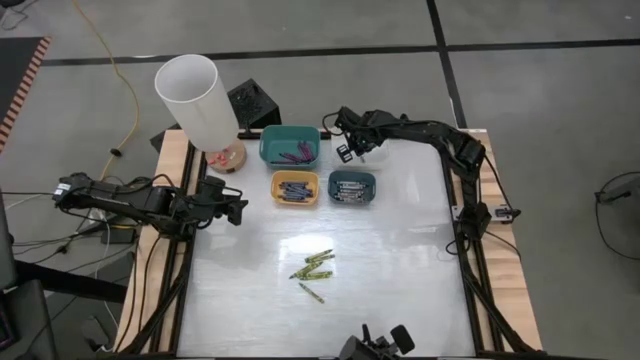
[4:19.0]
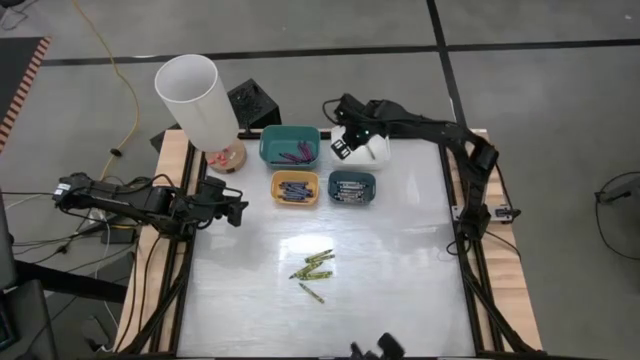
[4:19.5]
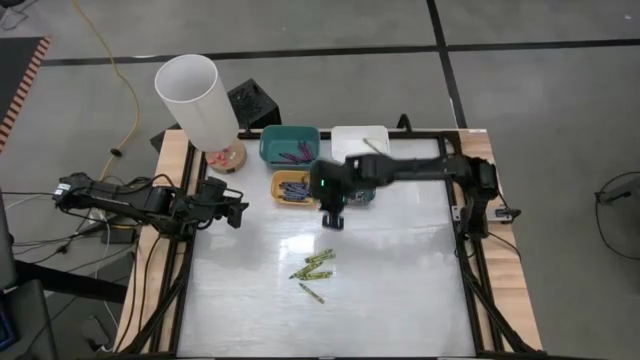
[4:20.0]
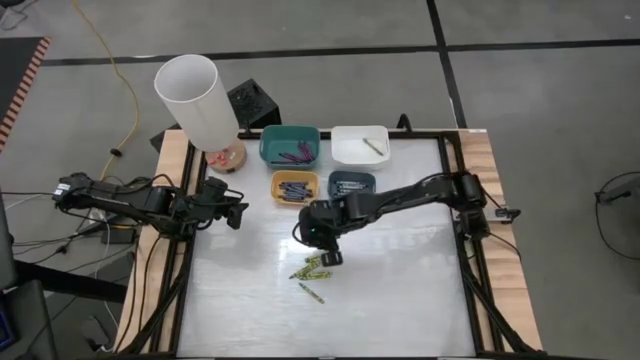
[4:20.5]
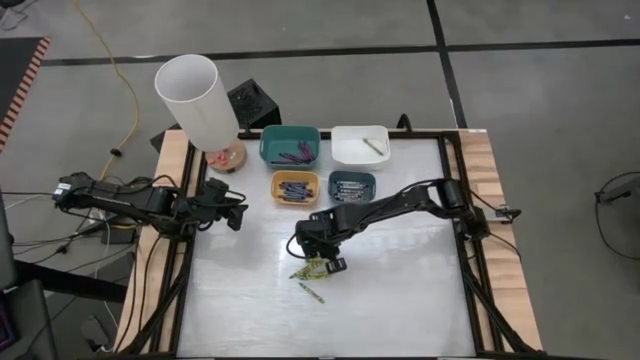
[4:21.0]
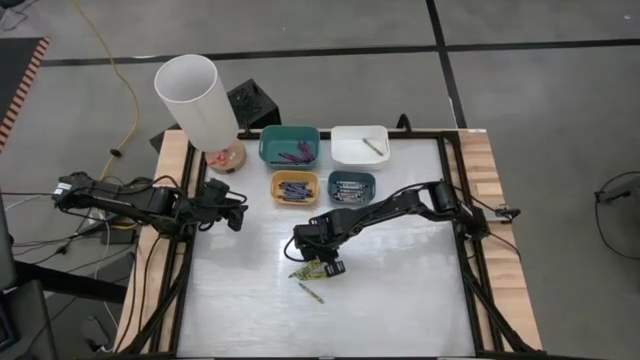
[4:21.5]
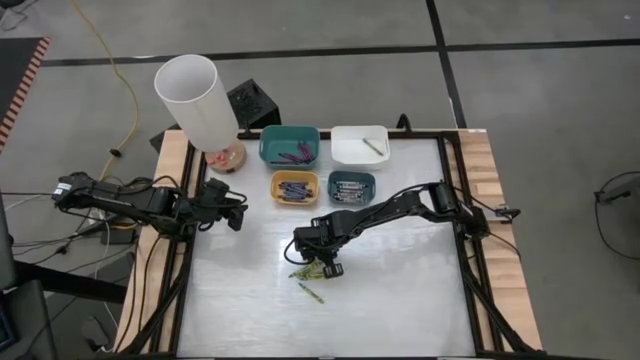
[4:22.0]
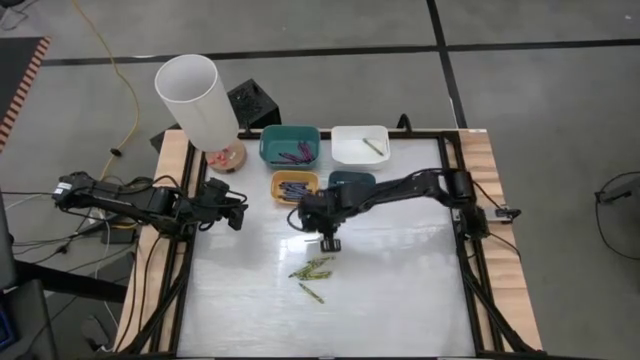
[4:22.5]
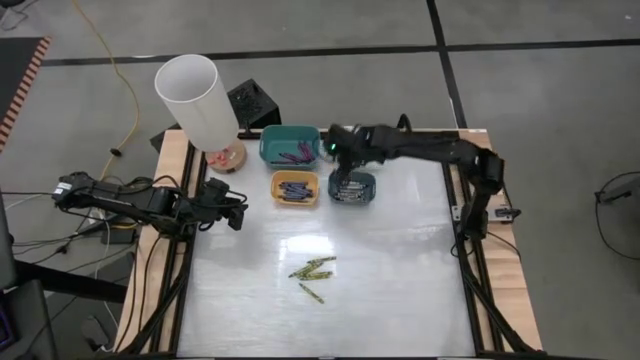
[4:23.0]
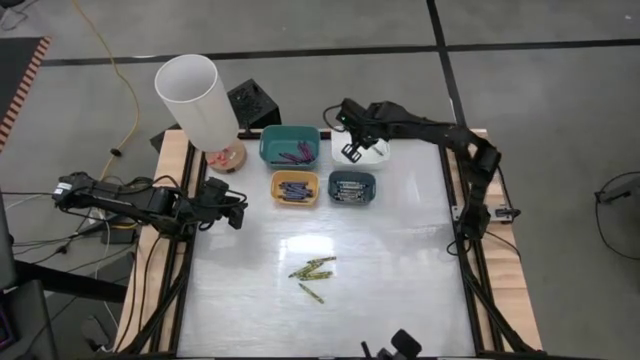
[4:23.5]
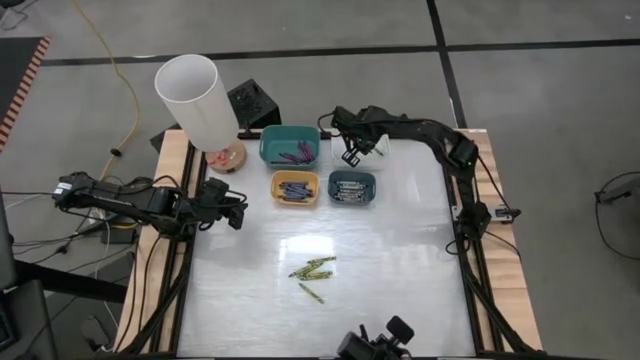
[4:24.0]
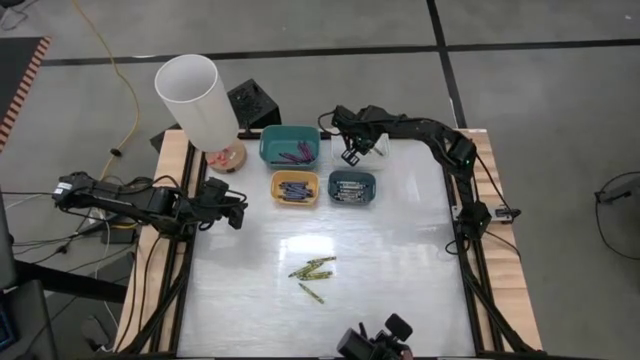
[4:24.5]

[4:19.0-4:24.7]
Task: Sort crayons
Put the green crayon into the white bin

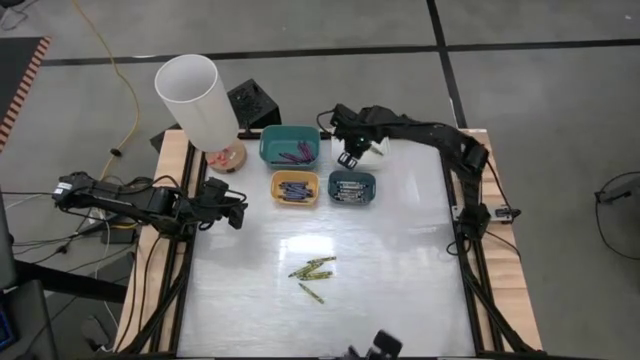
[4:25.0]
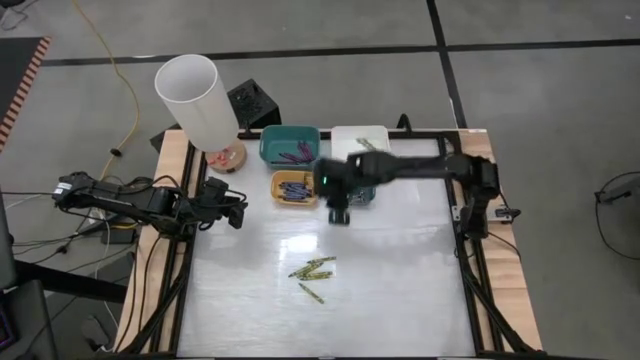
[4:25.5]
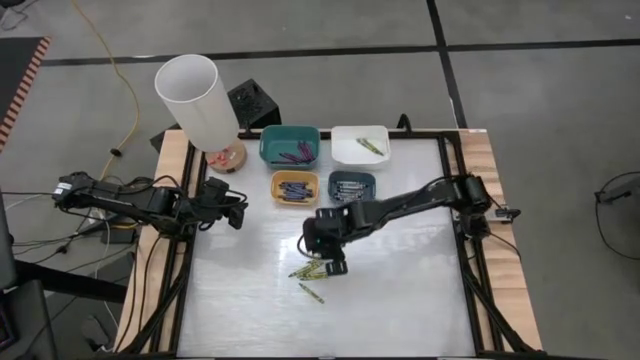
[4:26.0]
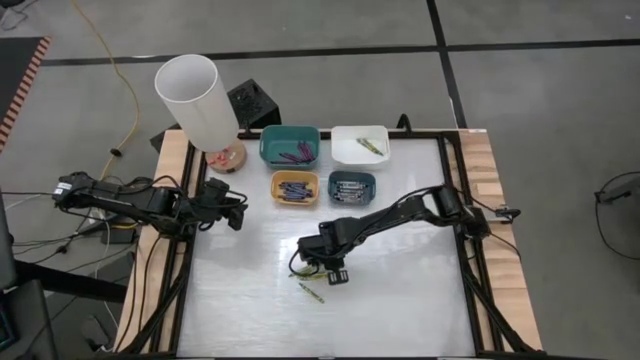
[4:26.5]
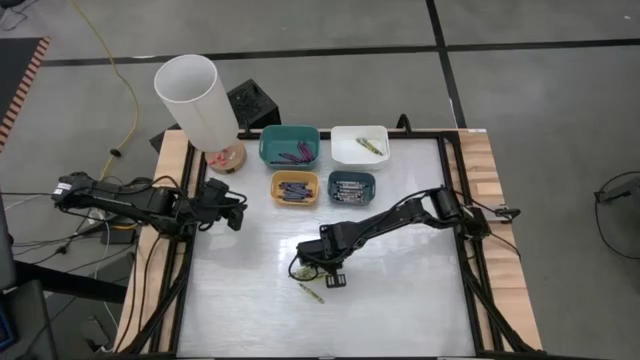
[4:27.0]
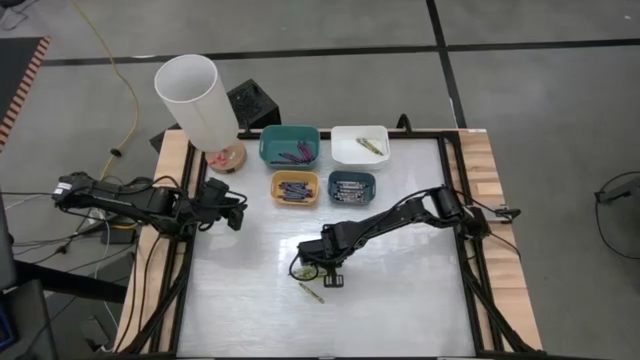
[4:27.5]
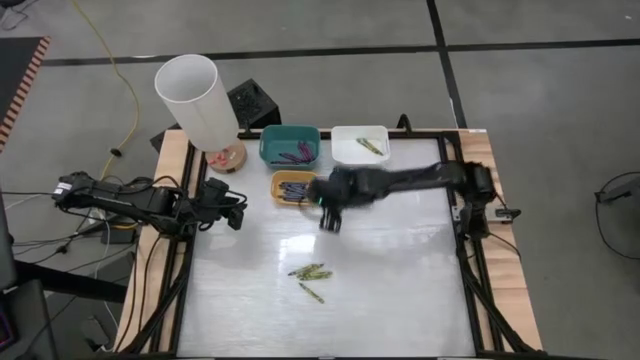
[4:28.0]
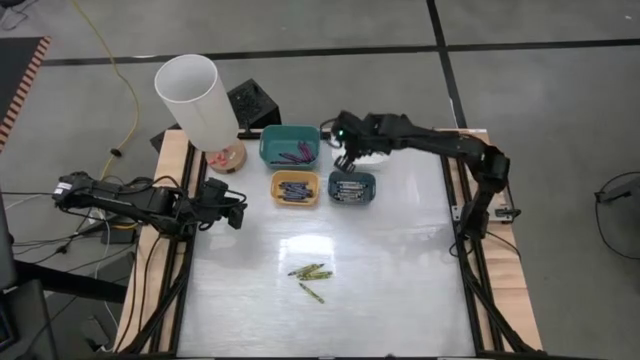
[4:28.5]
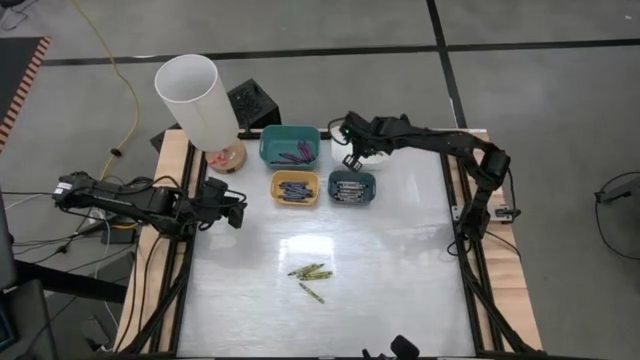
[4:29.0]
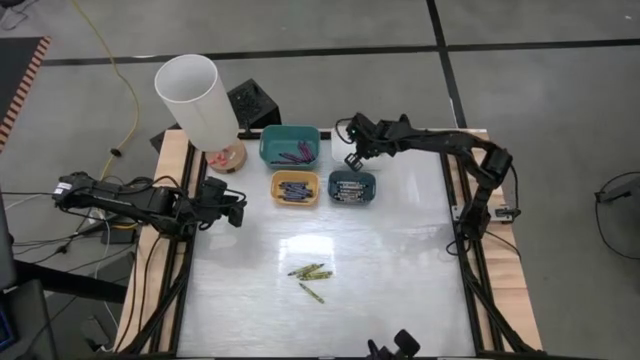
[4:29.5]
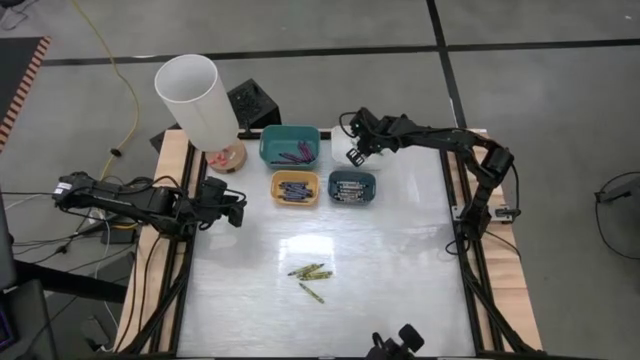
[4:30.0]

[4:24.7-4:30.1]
Put the green crayon into the white bin

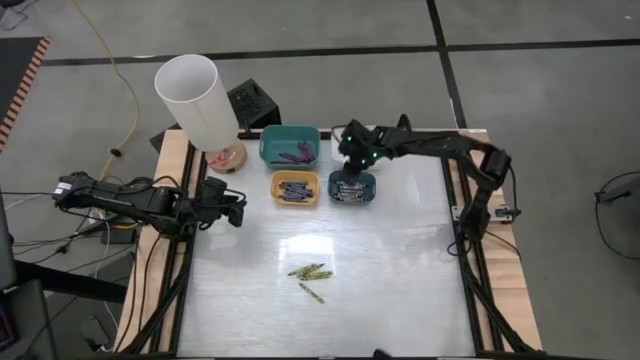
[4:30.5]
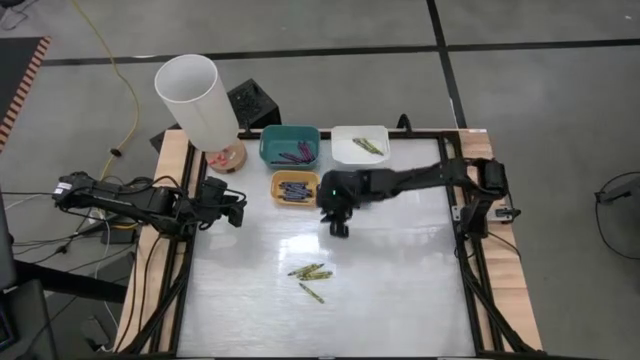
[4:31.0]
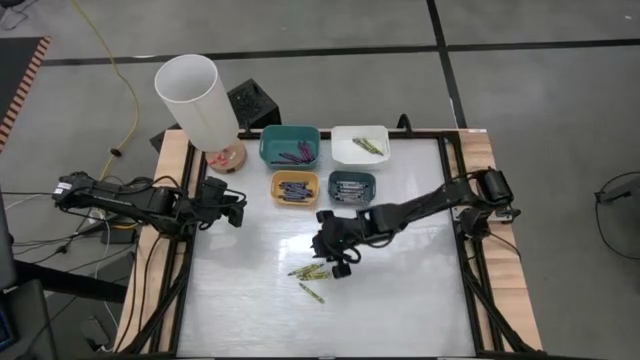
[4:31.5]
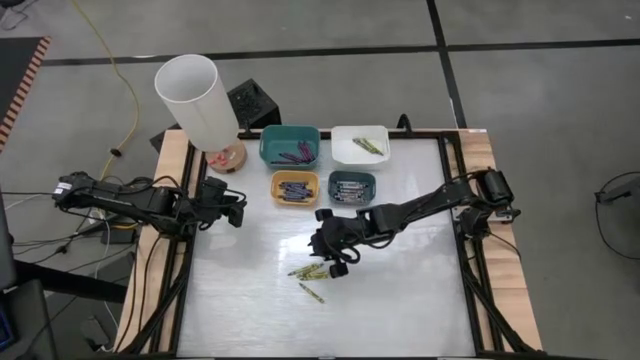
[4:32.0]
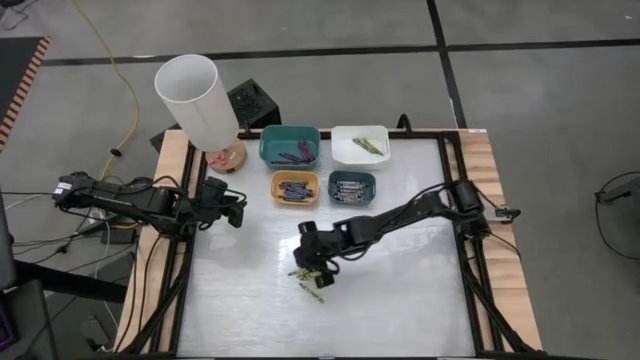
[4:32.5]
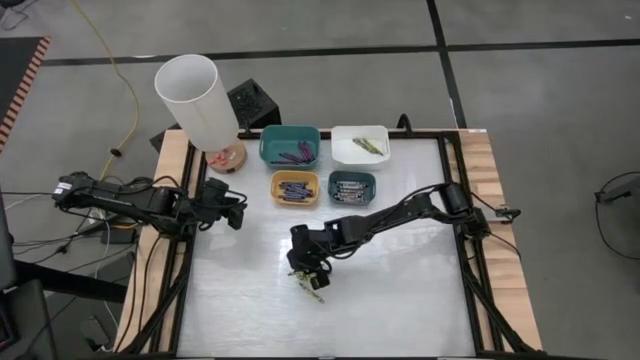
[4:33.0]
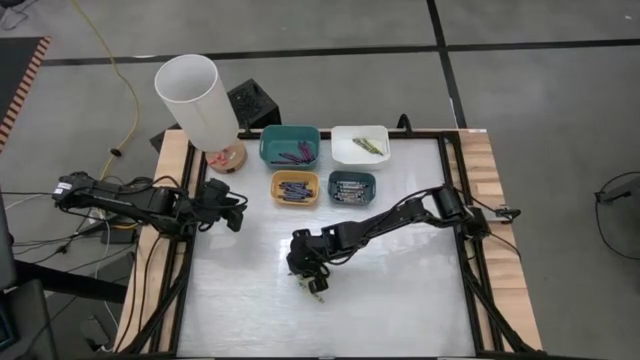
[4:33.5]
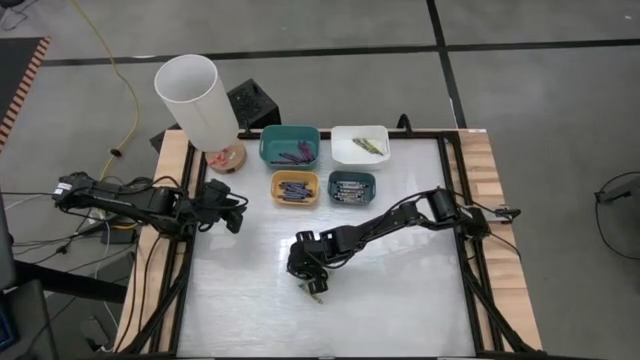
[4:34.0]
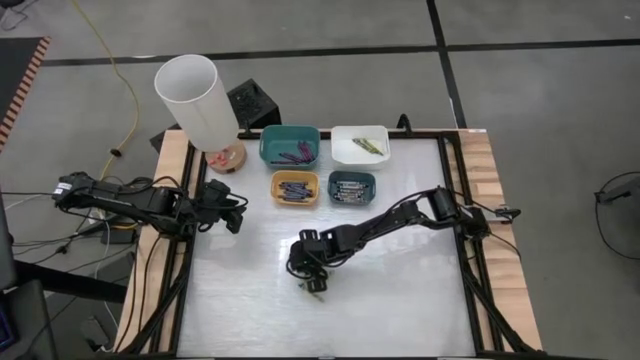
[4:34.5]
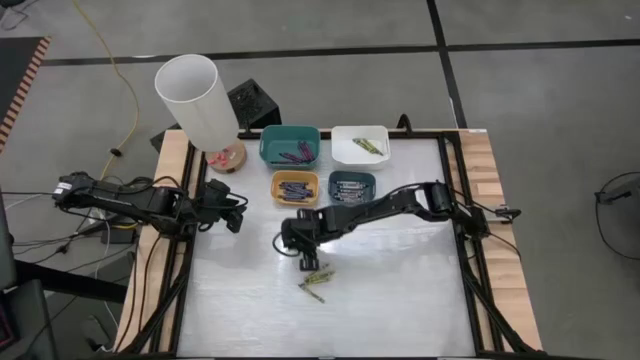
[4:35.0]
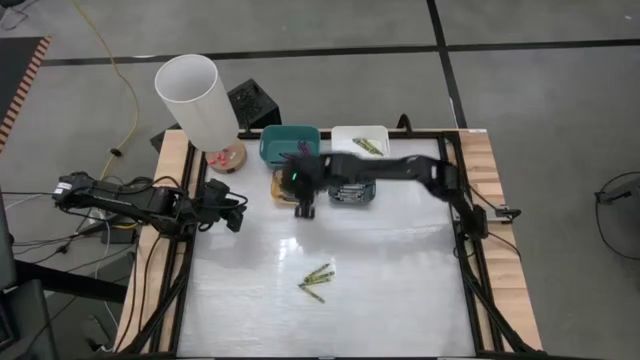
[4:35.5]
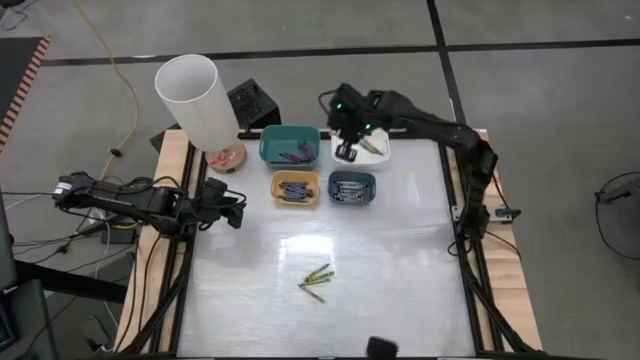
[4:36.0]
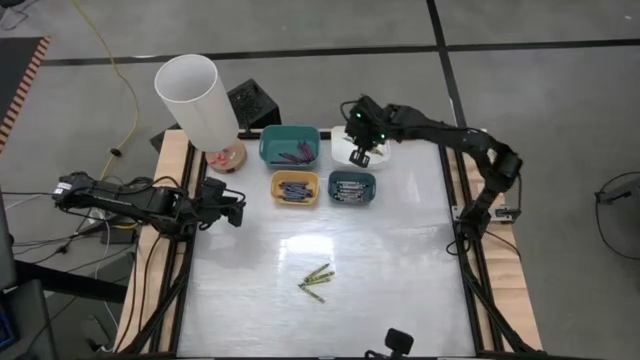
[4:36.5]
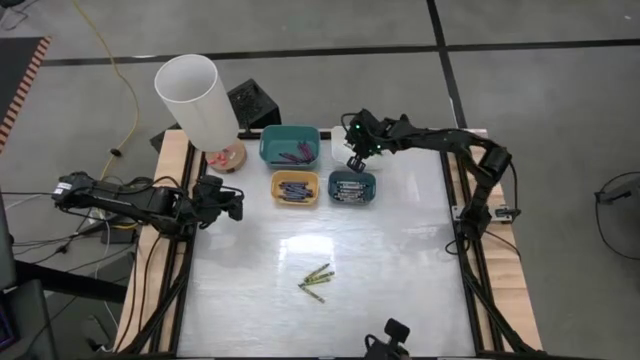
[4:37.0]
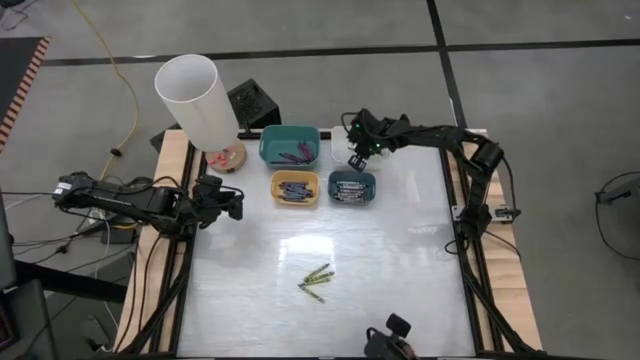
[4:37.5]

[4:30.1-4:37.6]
Put the green crayon into the white bin

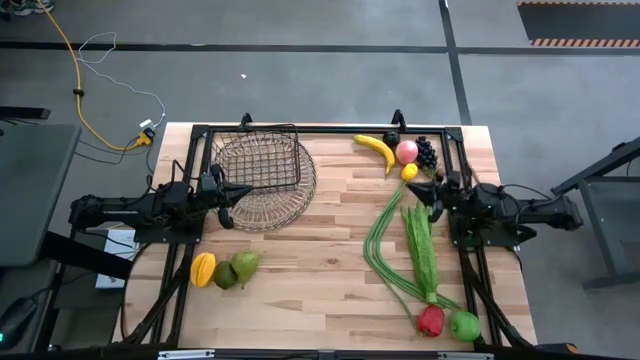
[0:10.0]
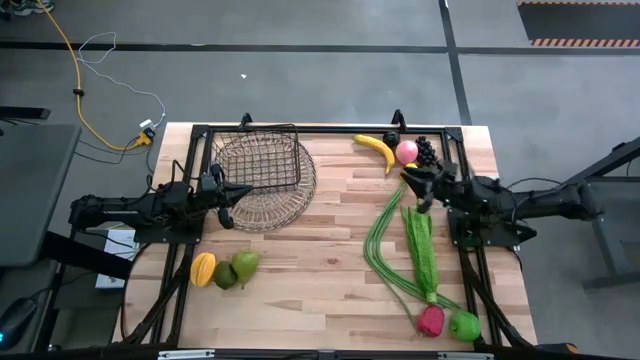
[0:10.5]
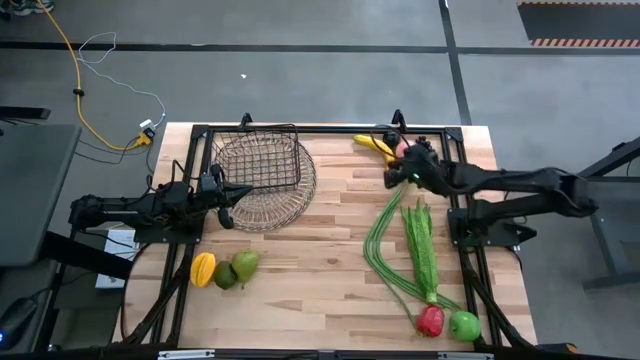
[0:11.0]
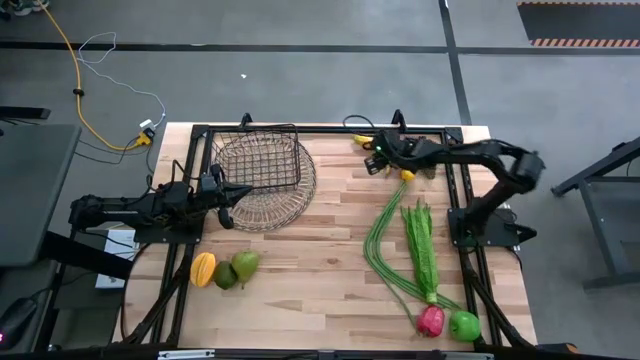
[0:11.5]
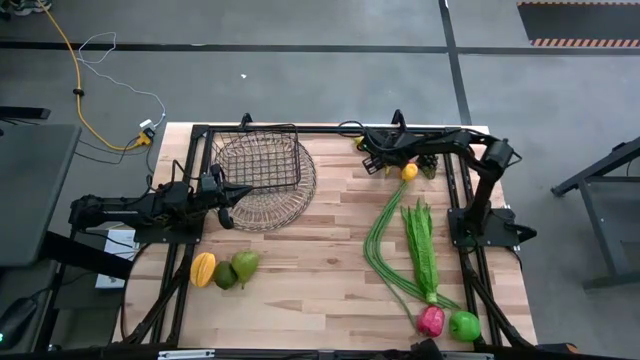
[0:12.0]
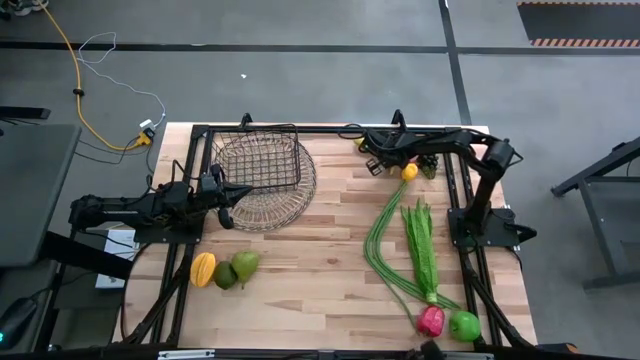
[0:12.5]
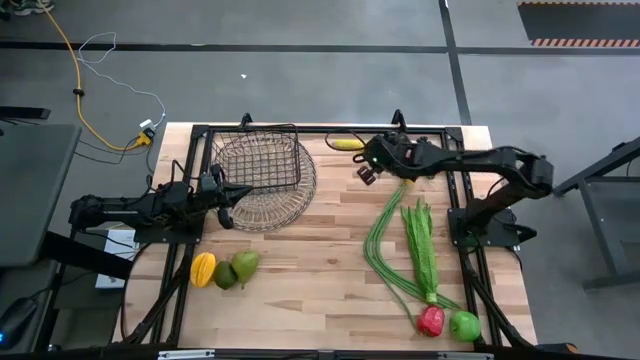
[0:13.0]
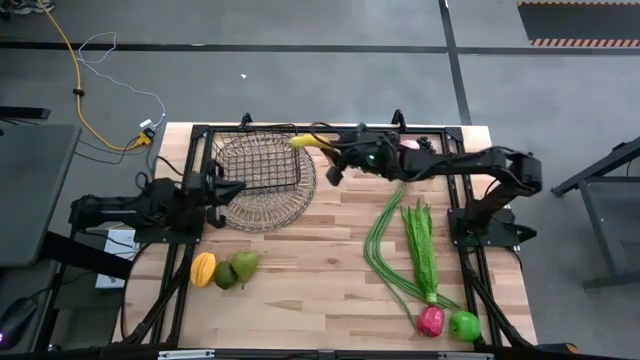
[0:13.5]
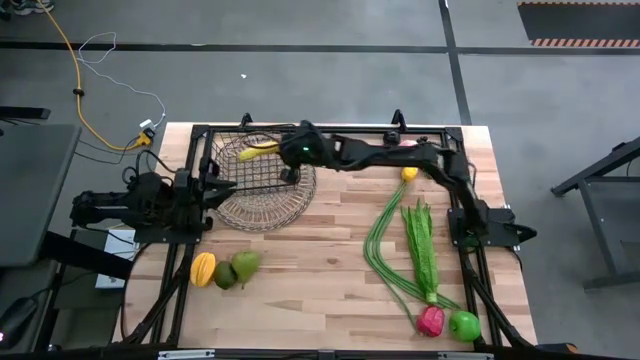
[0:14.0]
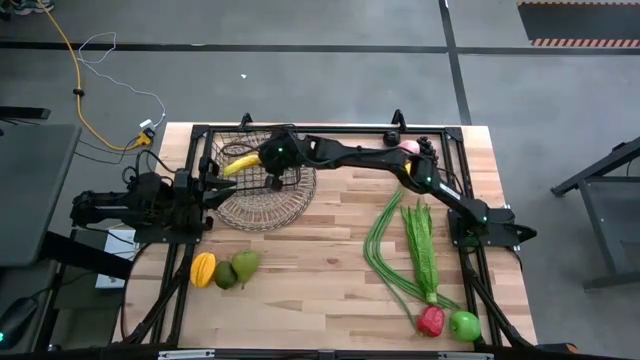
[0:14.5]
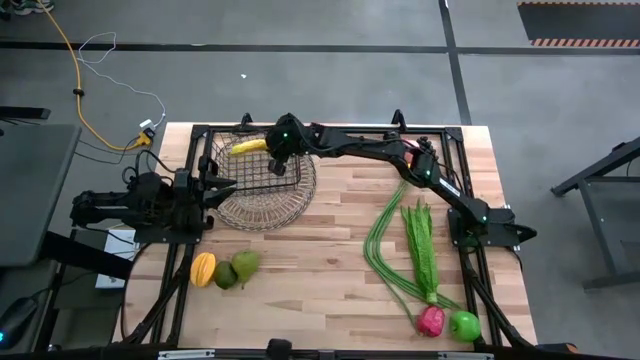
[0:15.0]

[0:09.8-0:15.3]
Task: Build produce basket
Put the yellow banana into the wire basket
